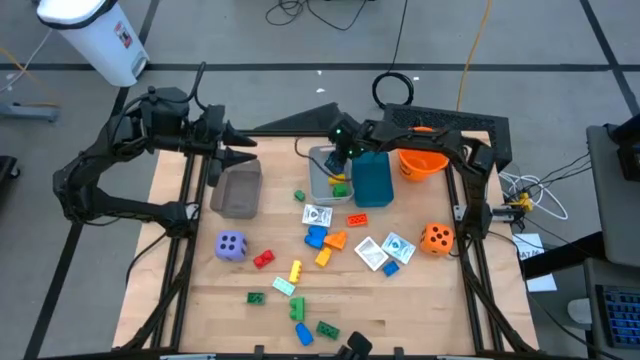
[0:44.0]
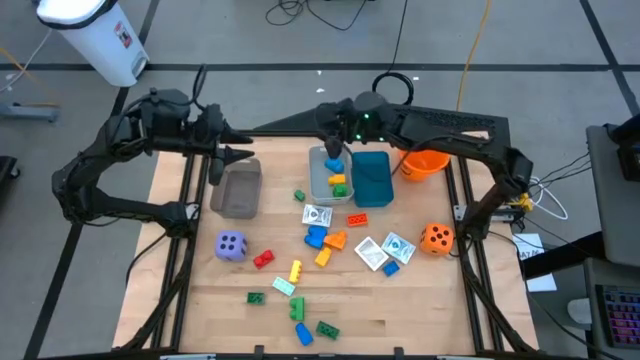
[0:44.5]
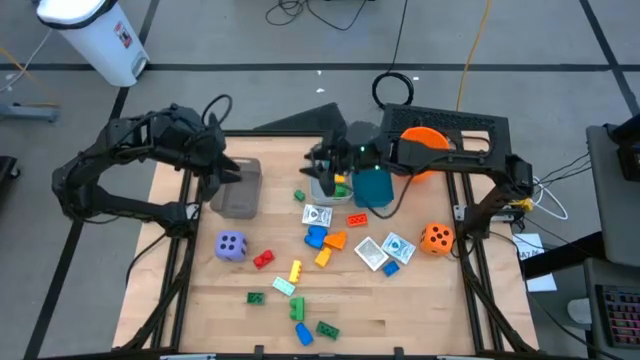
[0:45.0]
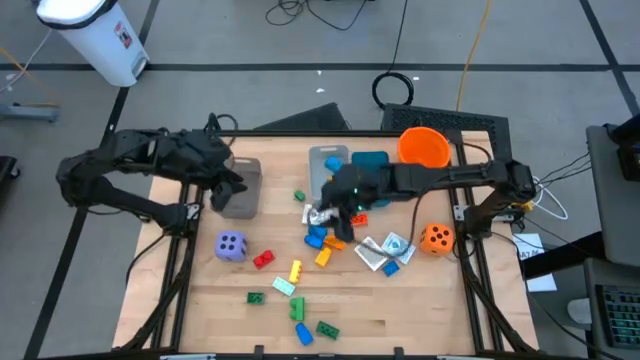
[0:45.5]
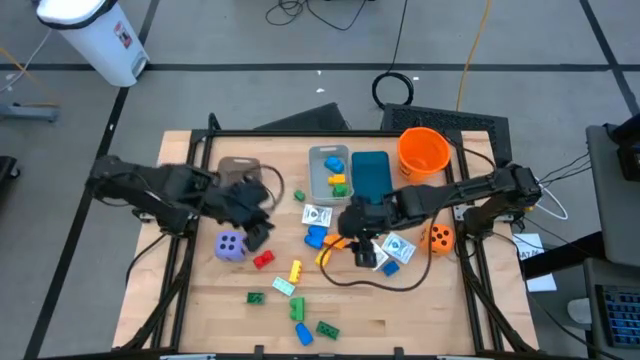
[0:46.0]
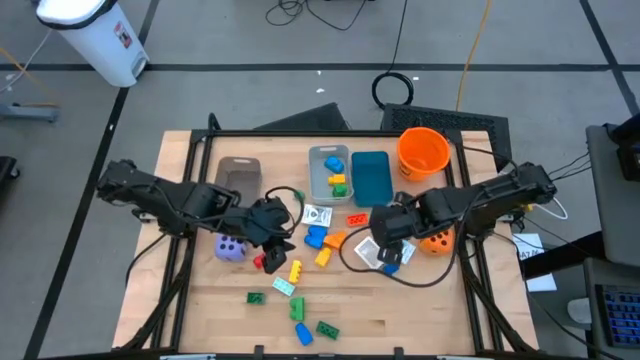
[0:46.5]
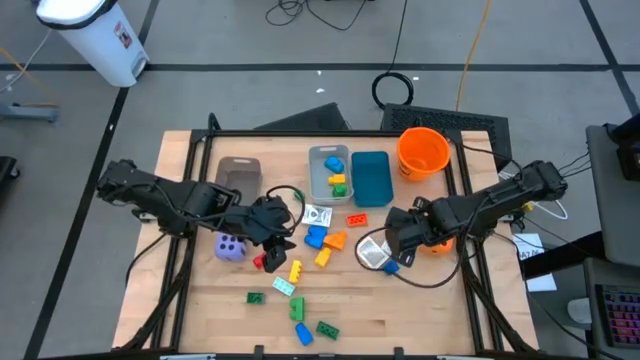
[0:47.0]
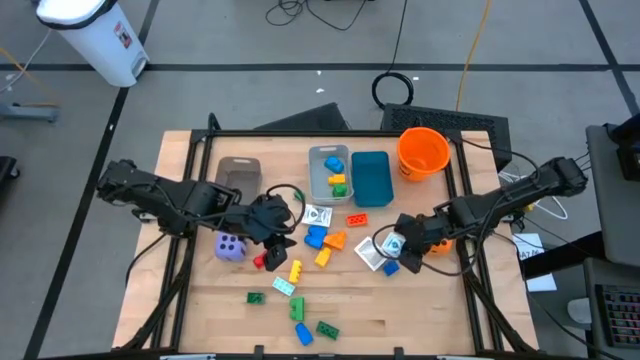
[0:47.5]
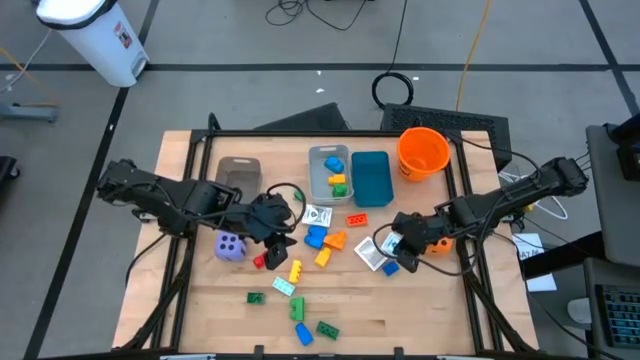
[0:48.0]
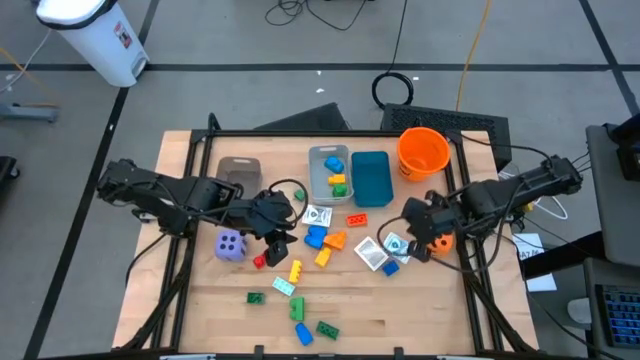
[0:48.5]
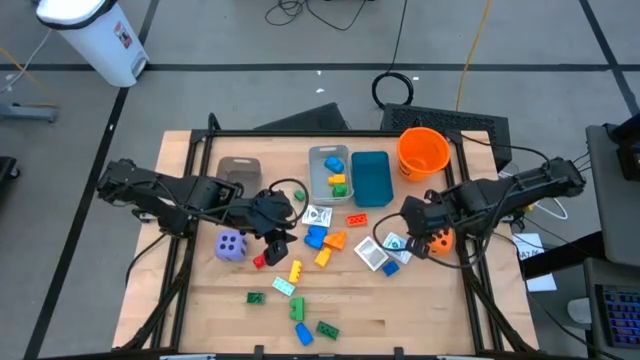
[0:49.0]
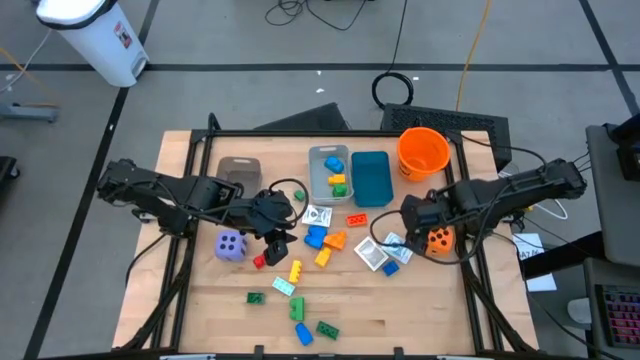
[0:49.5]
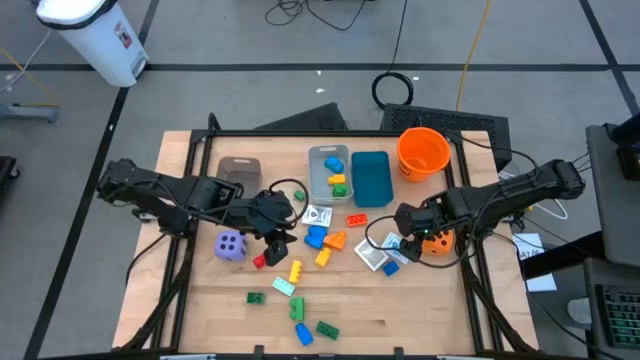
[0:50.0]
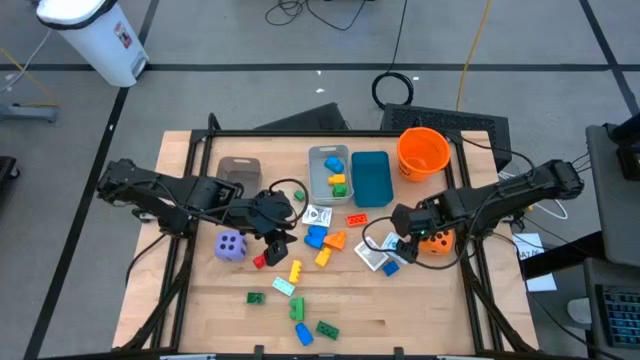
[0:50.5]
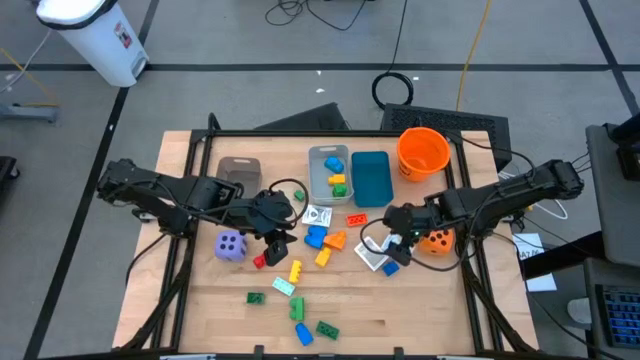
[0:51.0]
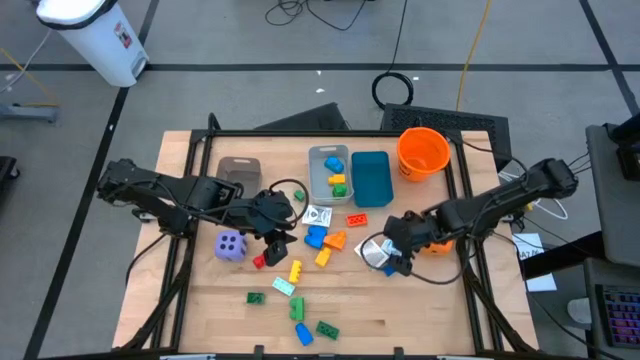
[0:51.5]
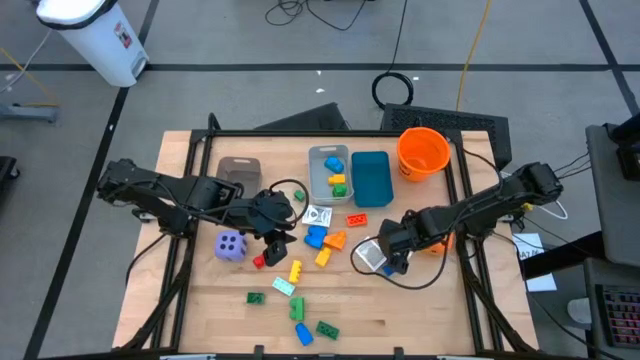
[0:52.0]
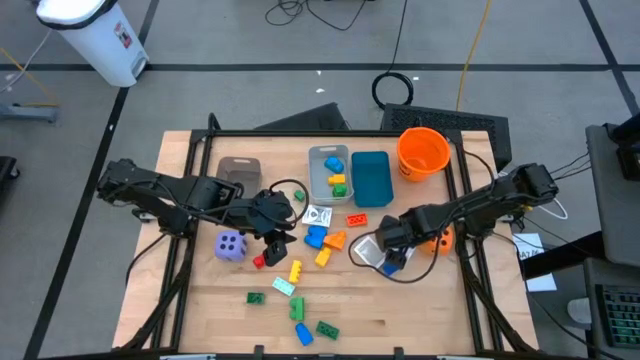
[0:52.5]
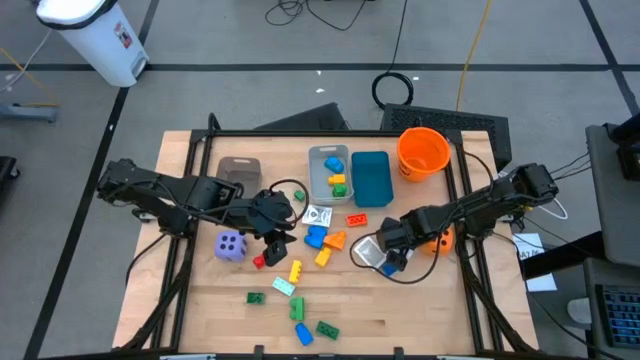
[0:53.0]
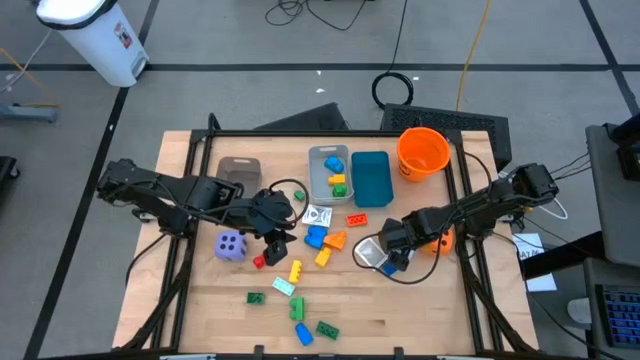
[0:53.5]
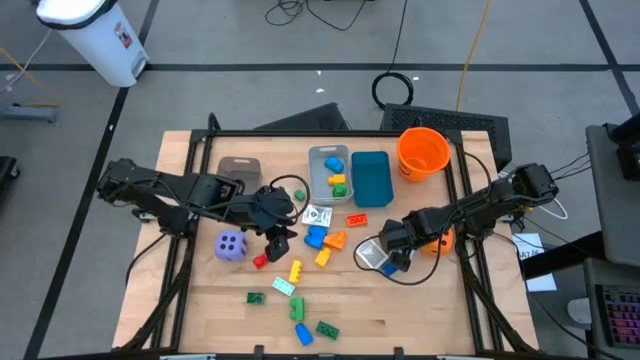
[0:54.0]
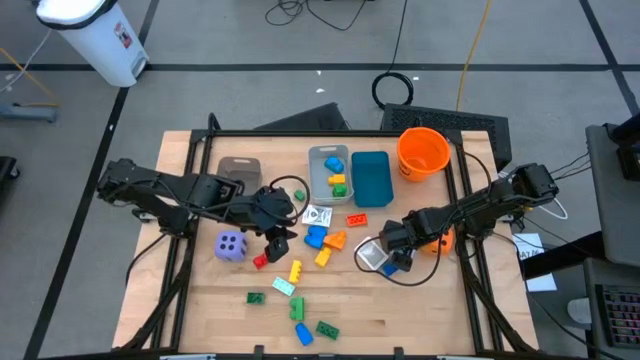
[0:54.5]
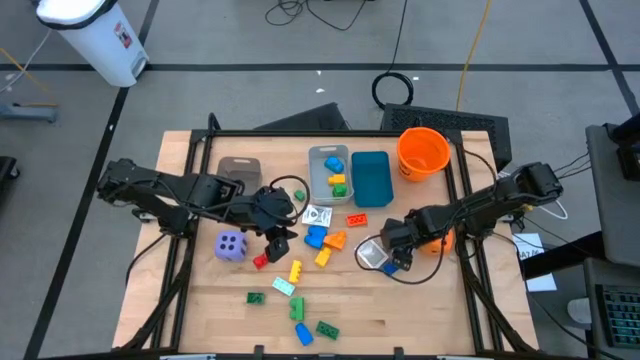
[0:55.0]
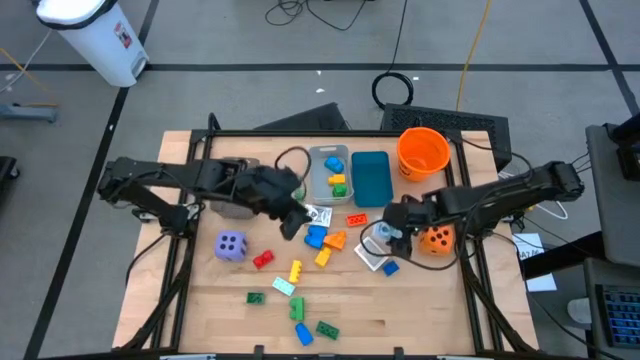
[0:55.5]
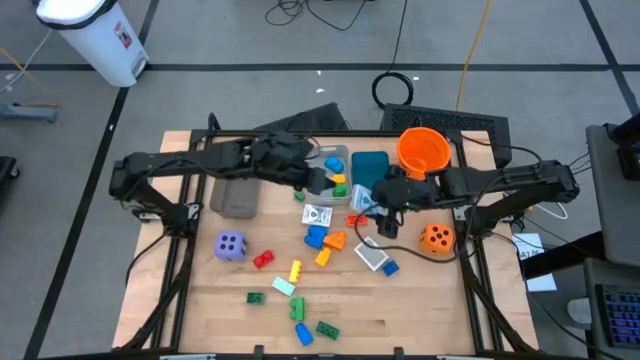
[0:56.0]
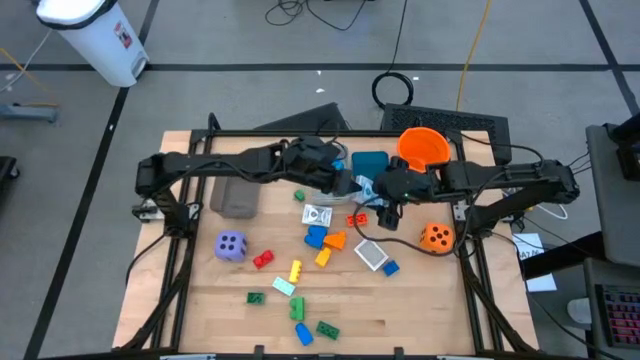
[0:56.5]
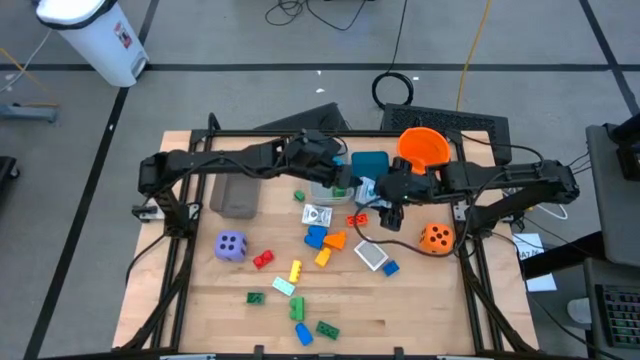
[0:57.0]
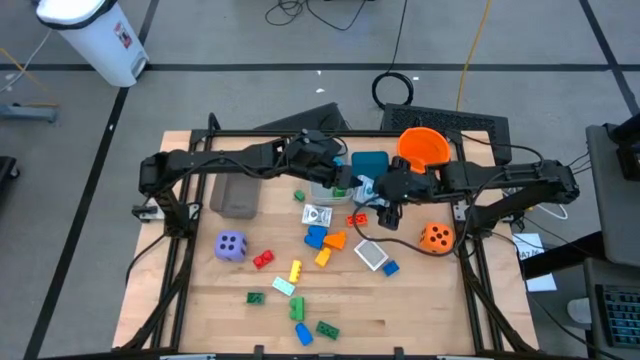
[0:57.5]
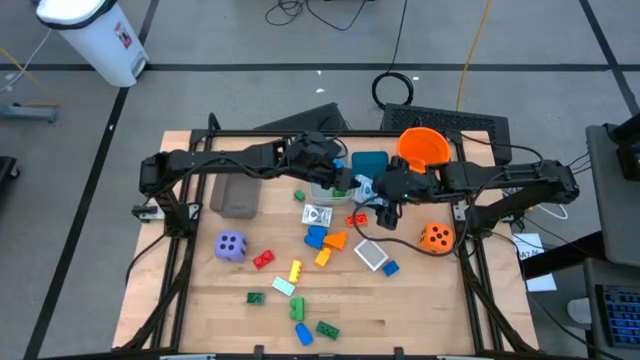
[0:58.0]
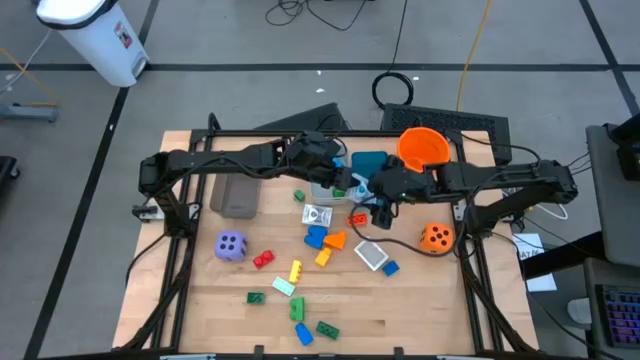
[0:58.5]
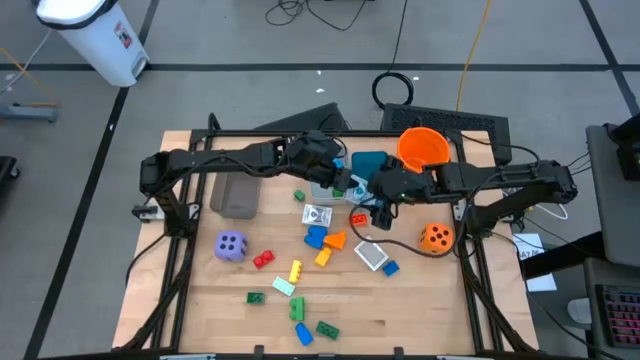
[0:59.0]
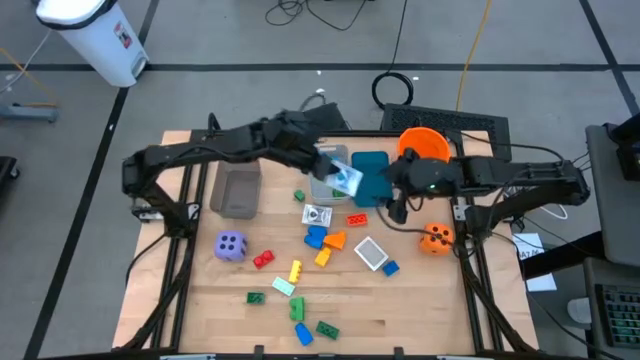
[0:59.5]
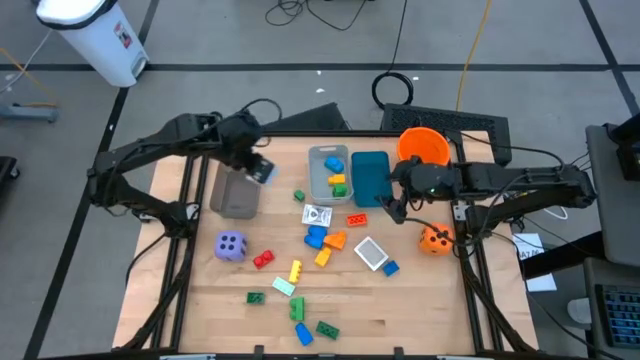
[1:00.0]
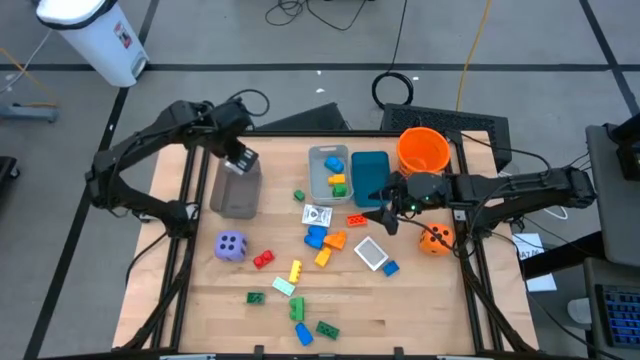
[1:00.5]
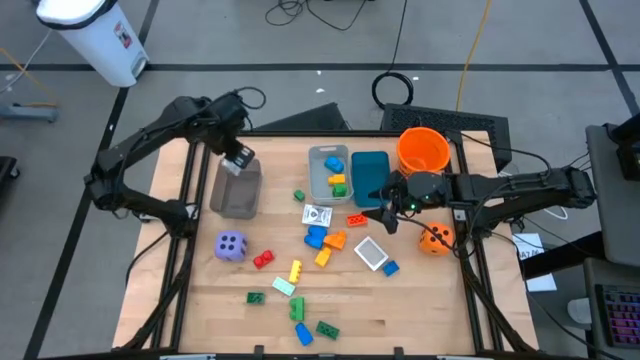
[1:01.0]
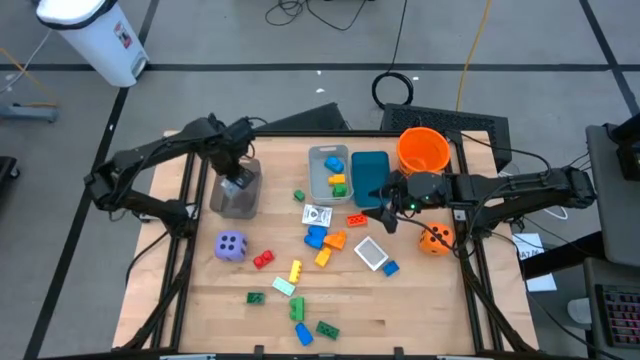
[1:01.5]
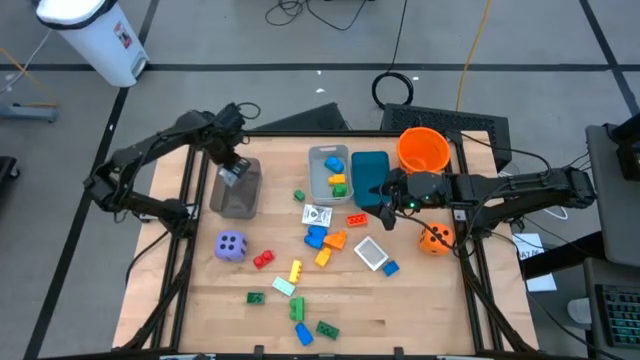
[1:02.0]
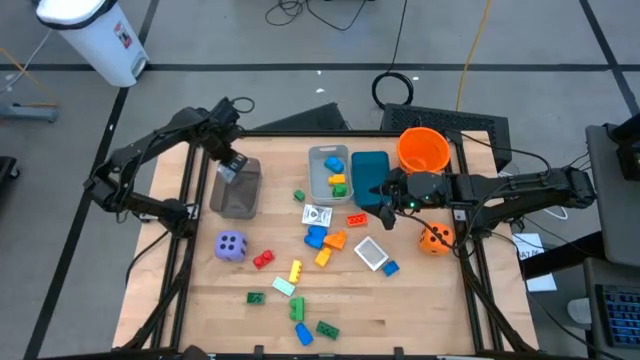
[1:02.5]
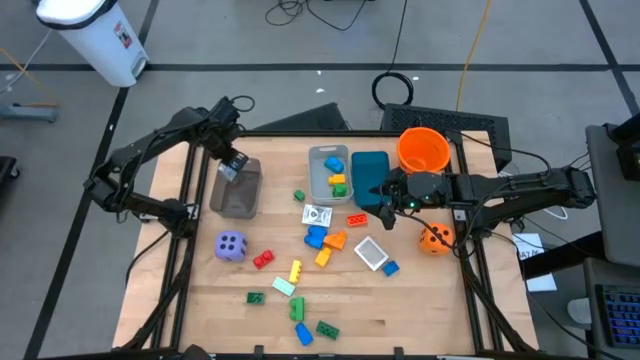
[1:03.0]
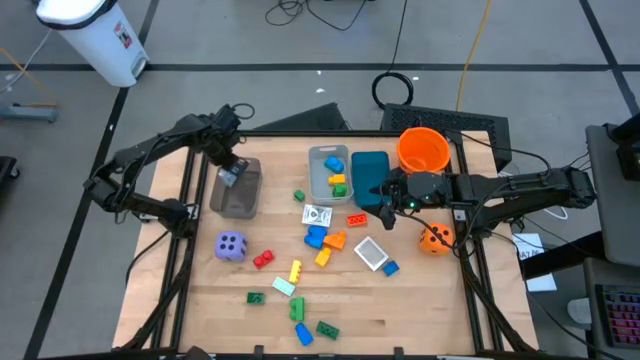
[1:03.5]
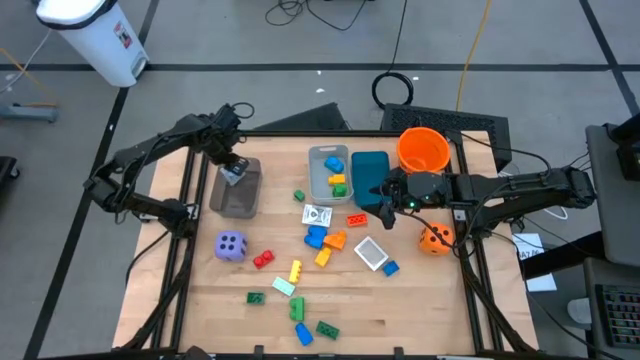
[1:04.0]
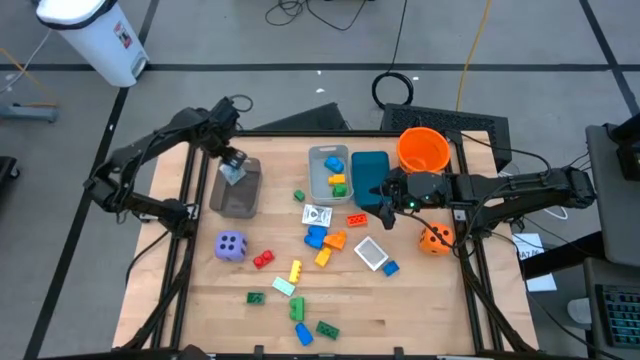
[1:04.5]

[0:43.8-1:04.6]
Task: Pick & Place Toys
Put the blue deck of cards into the black bin
